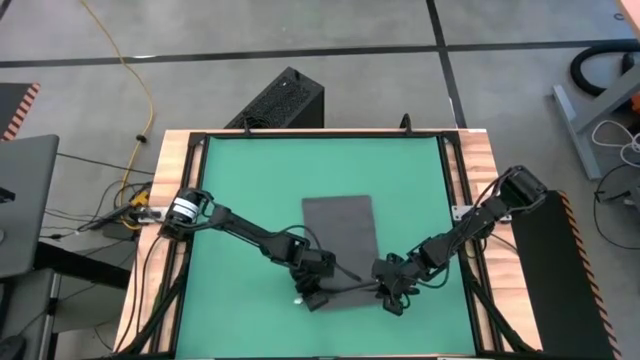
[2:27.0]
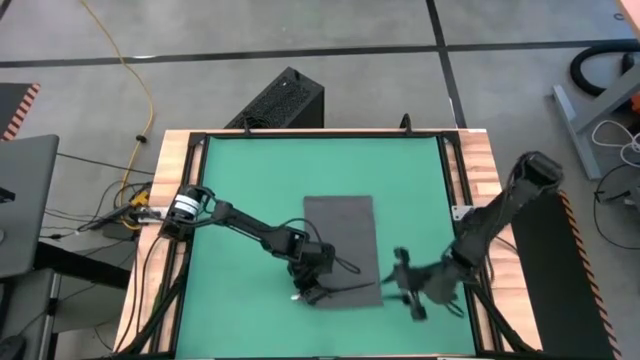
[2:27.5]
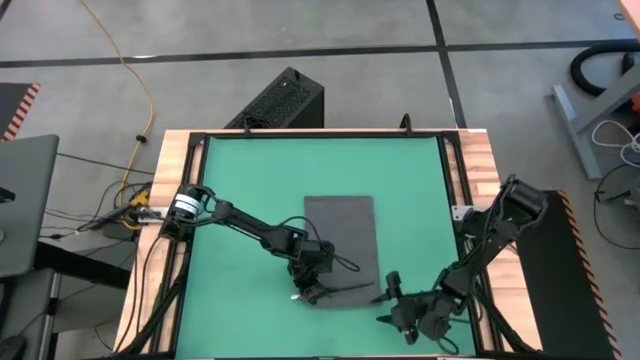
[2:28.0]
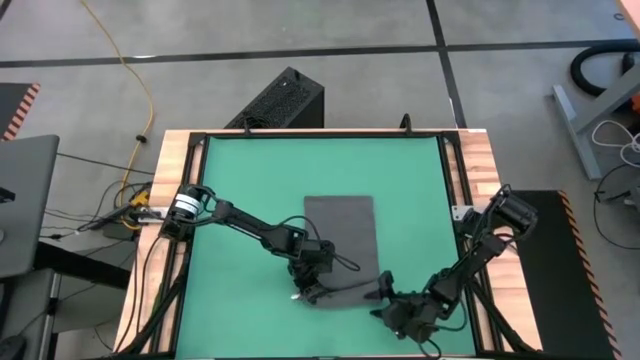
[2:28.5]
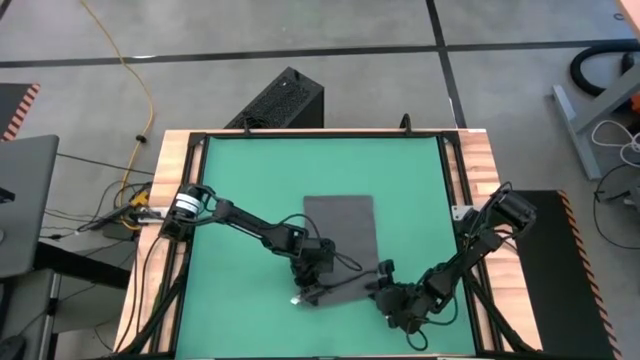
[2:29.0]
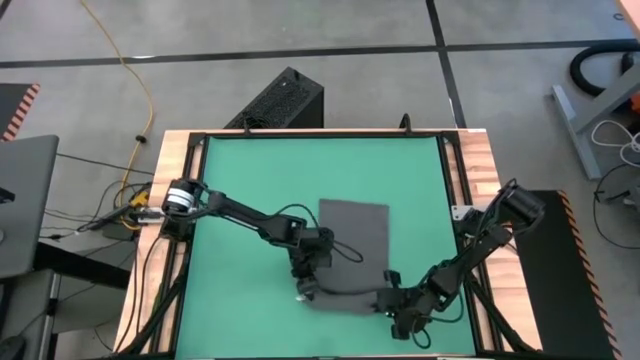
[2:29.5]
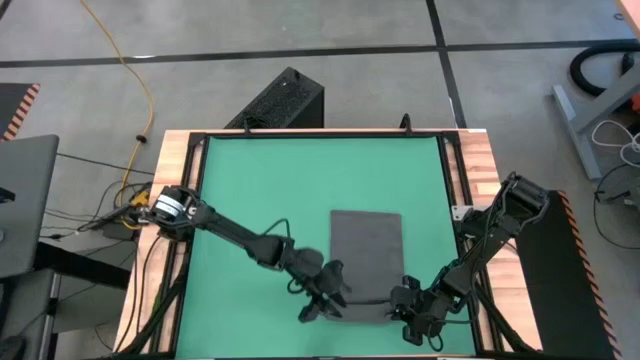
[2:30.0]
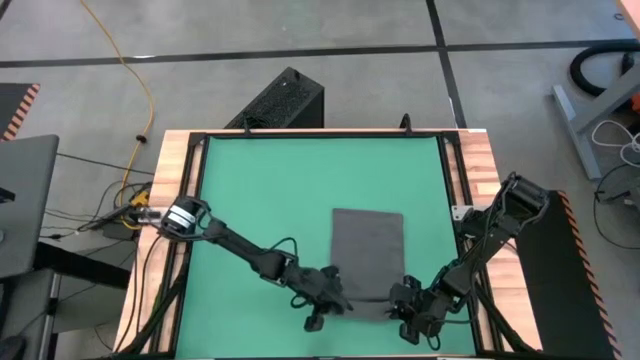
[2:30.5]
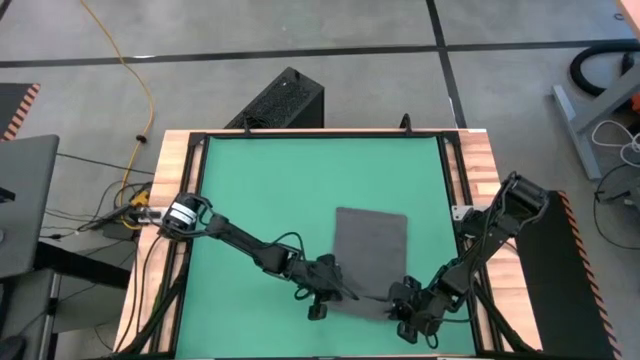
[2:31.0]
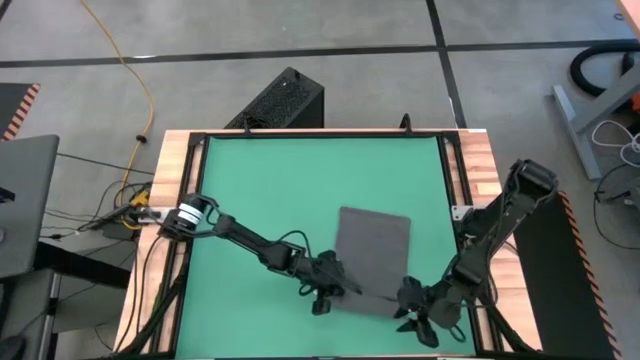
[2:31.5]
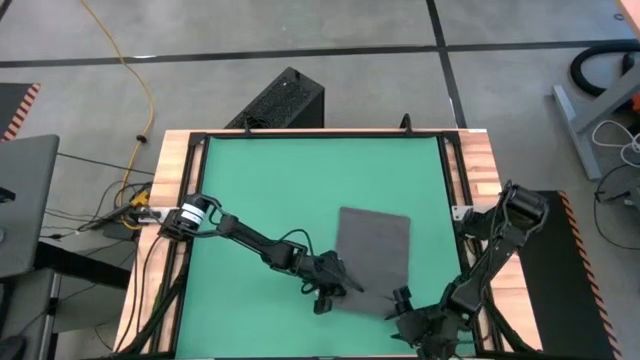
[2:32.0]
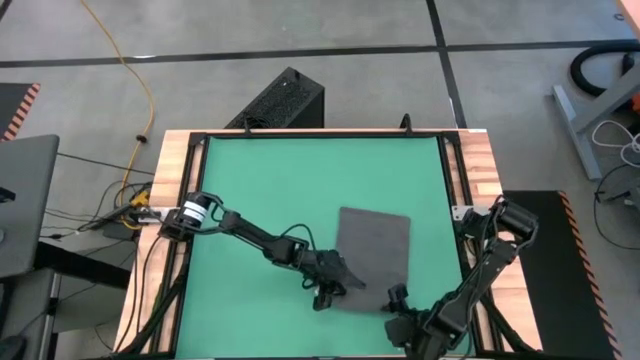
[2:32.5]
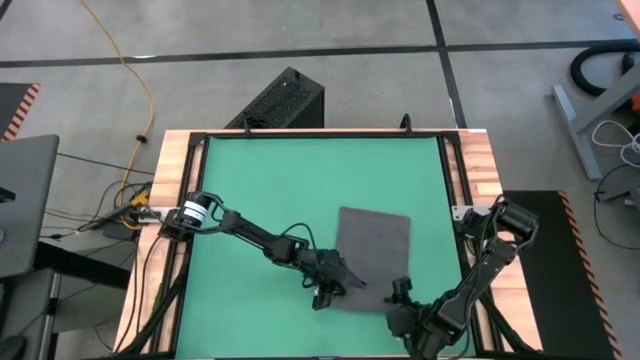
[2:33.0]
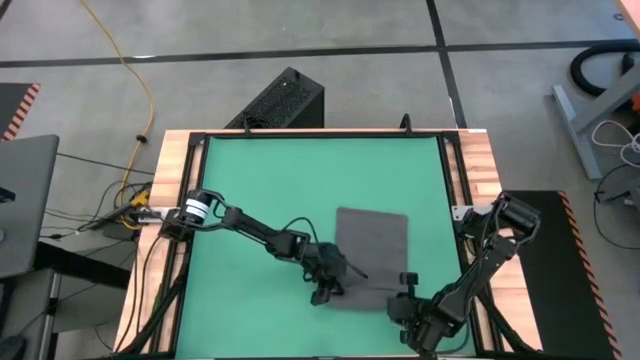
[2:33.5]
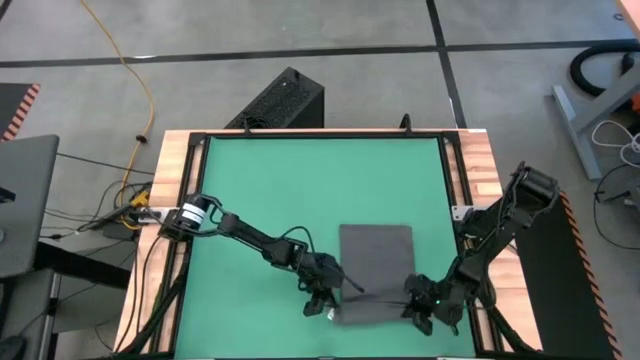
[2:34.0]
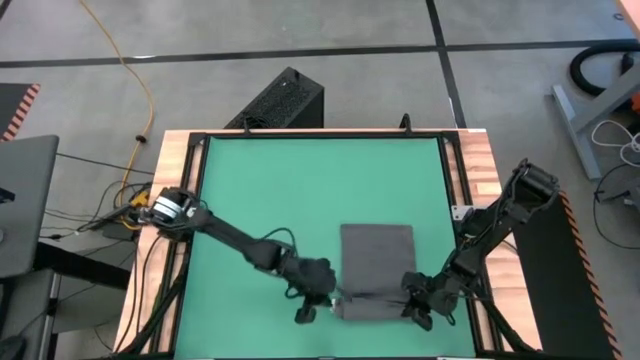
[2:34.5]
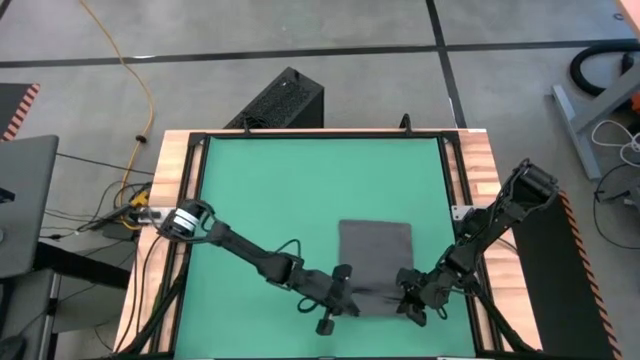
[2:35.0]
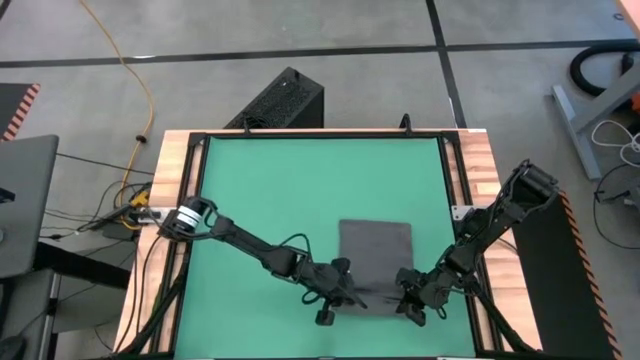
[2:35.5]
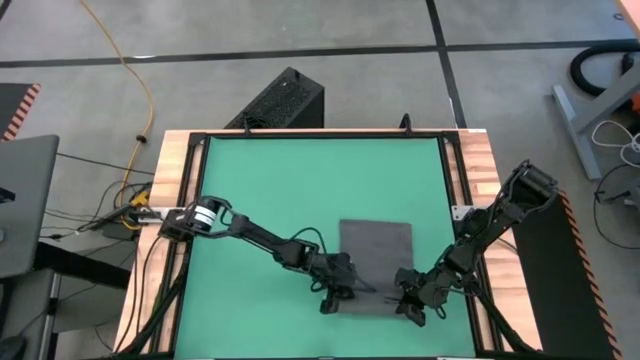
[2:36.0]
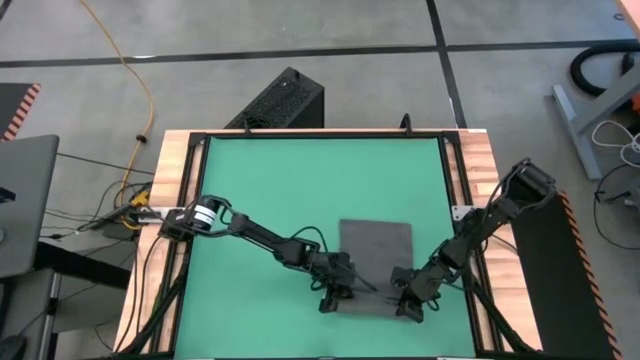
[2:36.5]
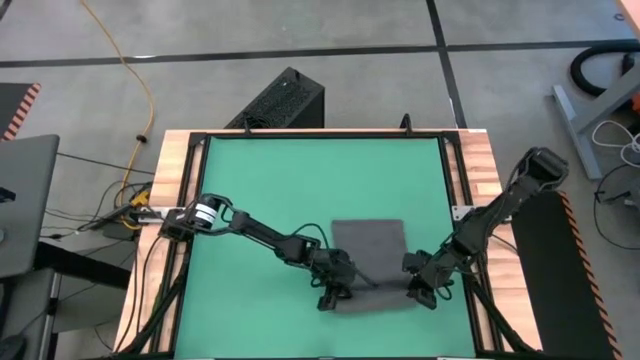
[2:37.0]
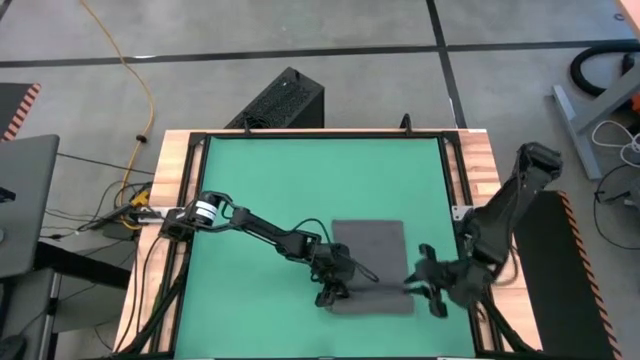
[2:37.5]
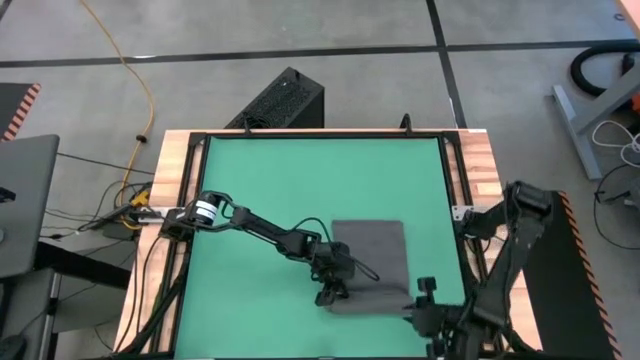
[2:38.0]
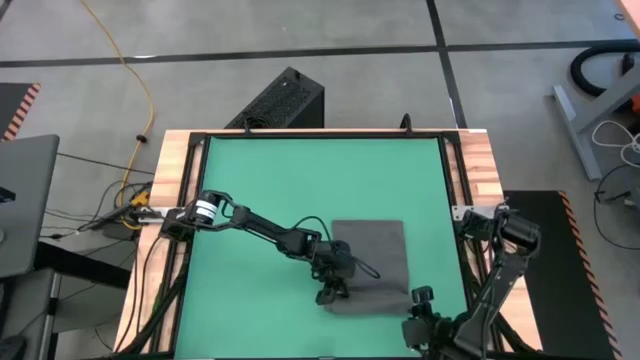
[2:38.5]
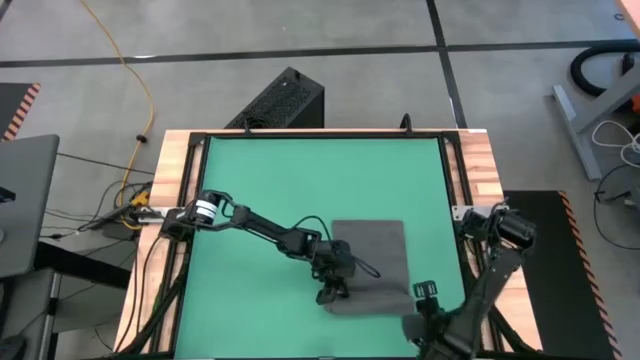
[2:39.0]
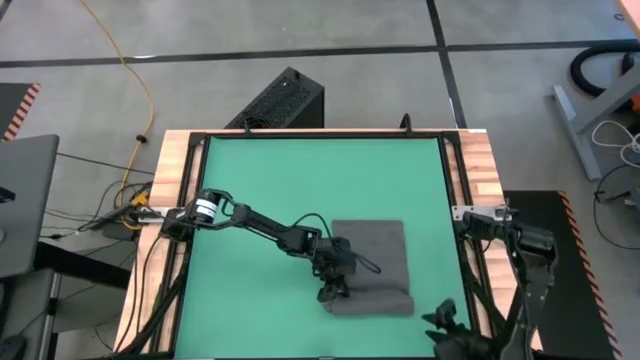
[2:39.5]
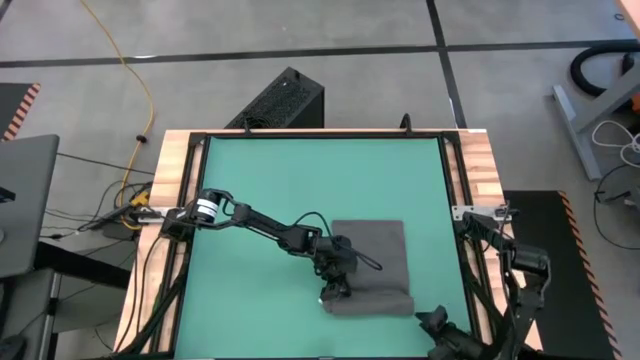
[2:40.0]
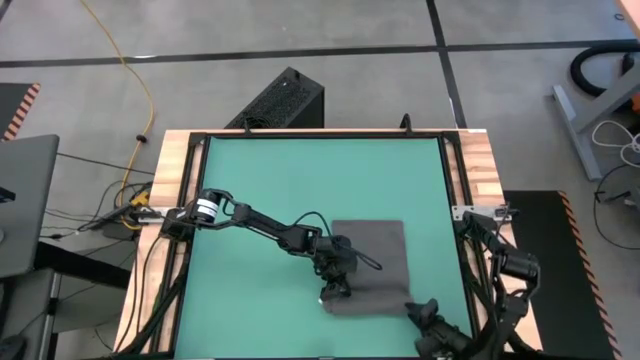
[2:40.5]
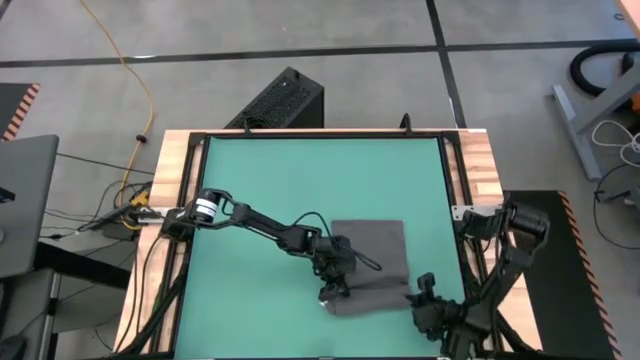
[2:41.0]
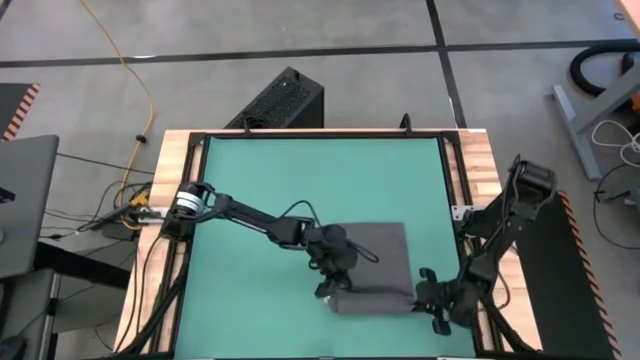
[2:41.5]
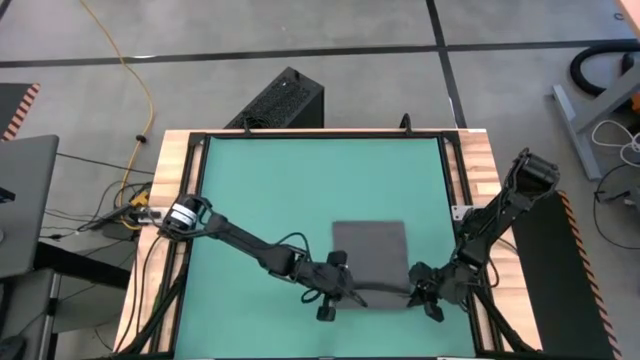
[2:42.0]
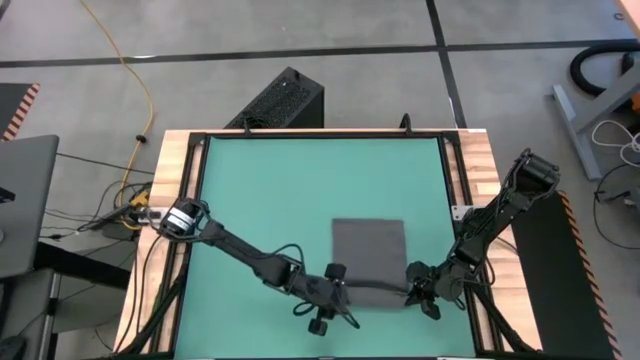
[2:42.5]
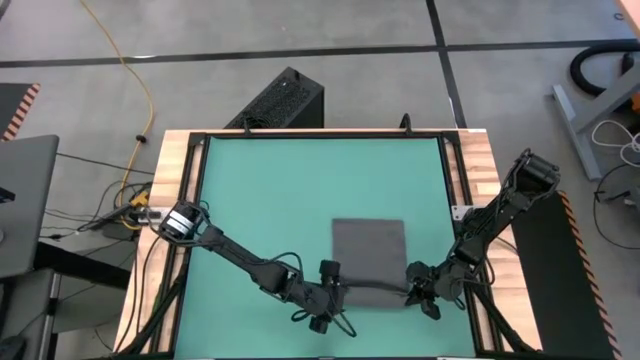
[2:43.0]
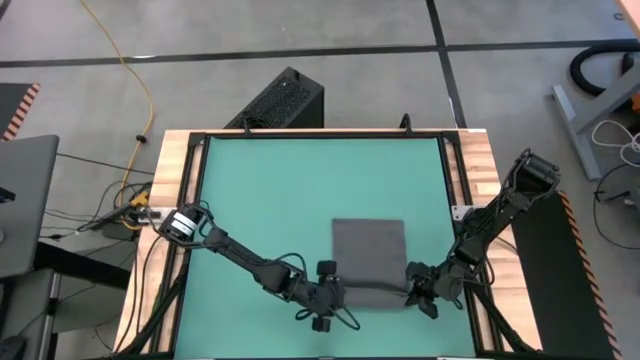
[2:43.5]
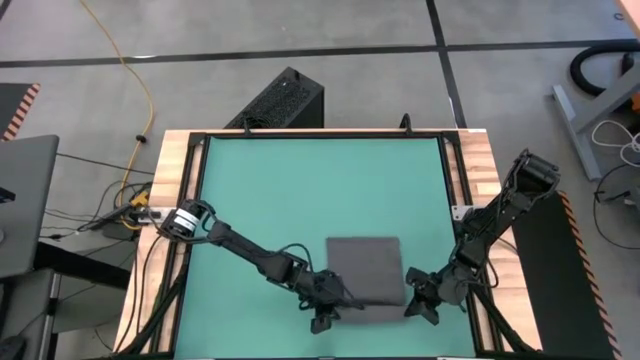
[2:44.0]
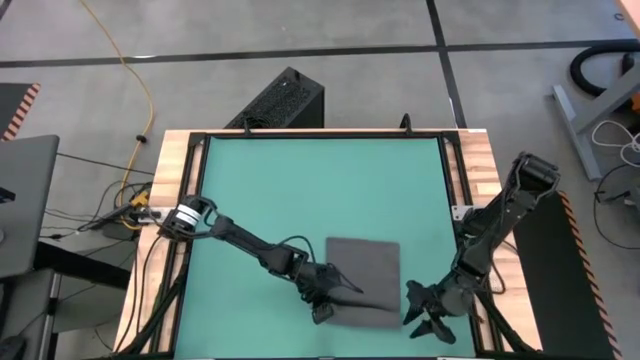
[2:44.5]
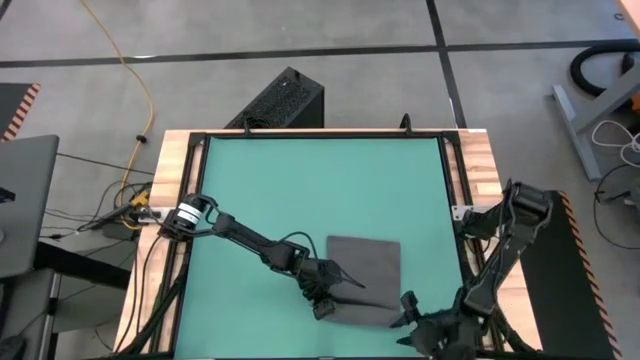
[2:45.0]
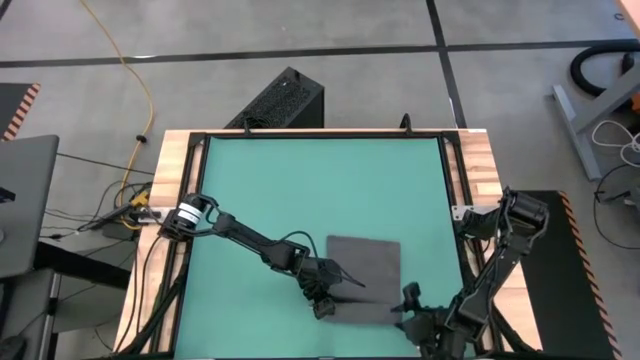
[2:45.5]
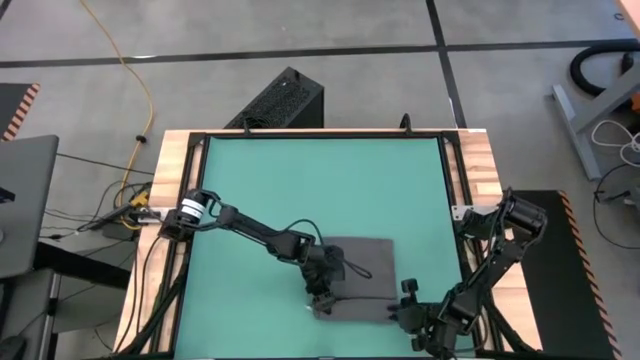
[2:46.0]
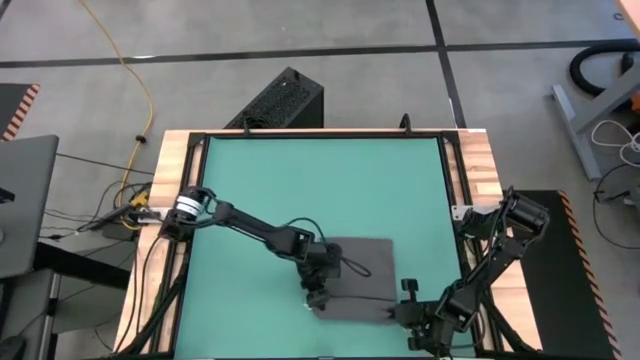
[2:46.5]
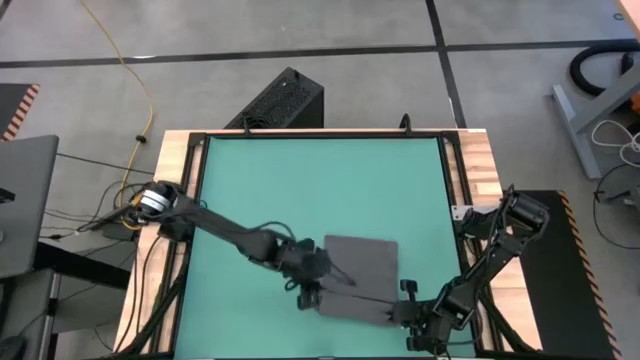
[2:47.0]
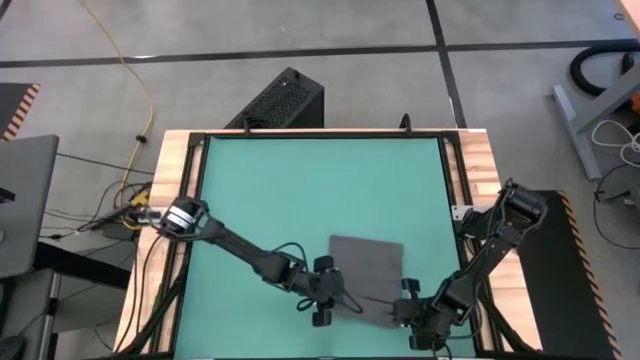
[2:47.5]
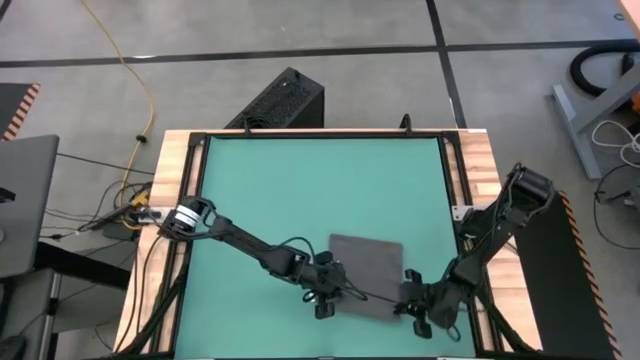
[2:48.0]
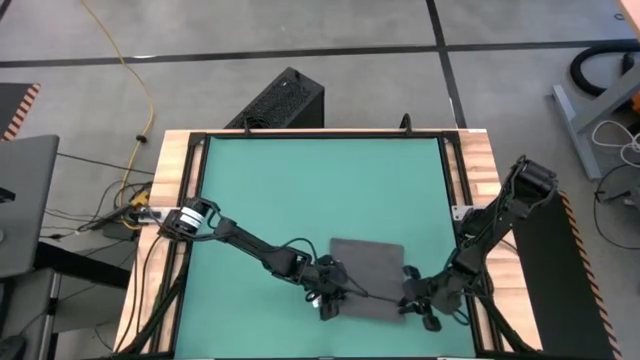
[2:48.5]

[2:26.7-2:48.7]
Task: Roll towel
Roll the gray towel
